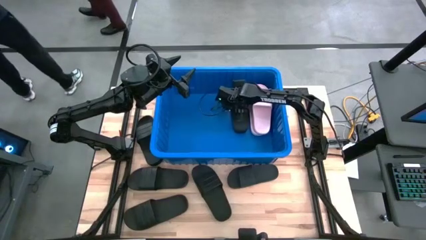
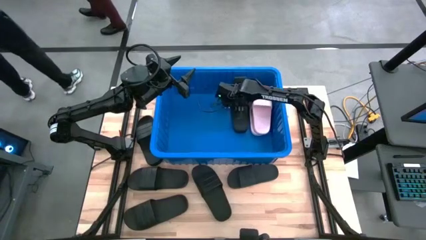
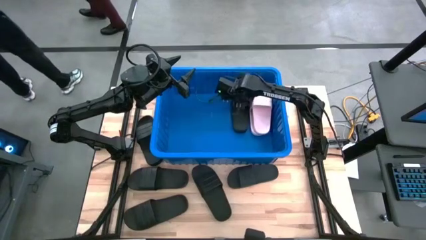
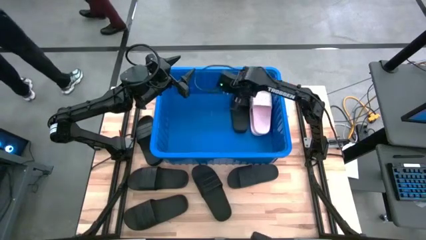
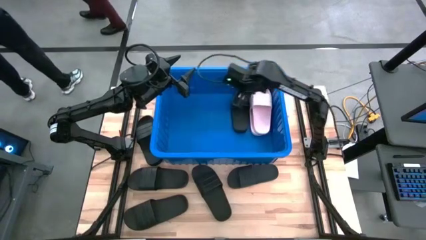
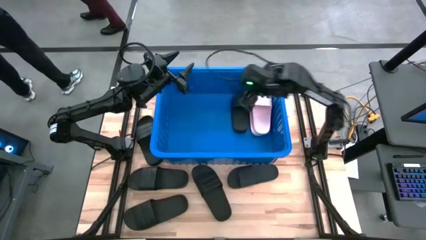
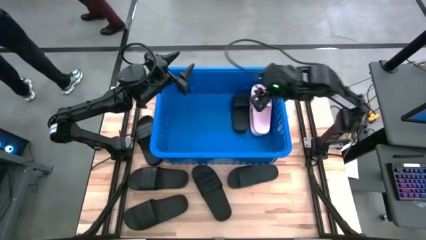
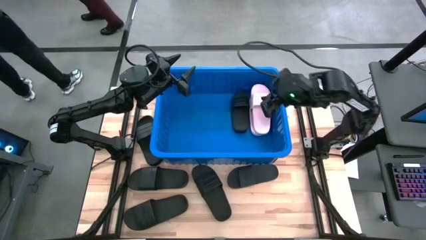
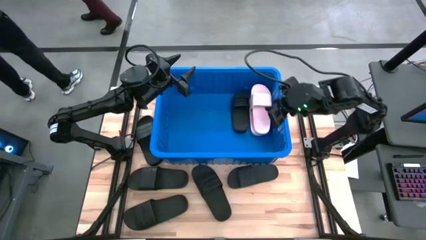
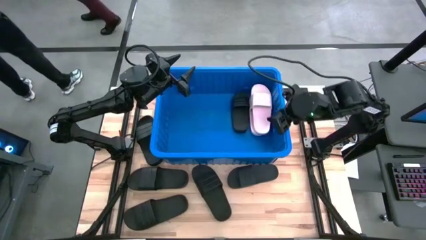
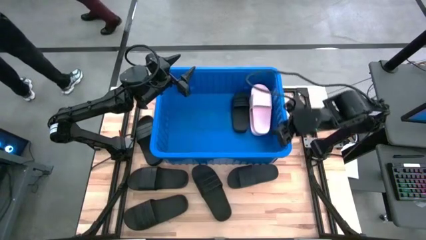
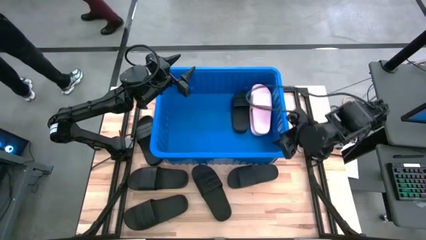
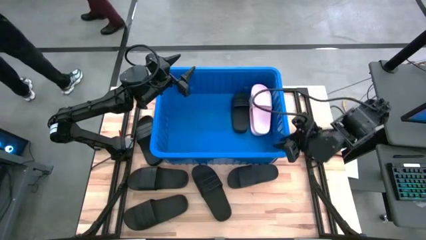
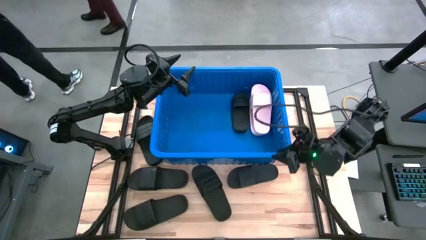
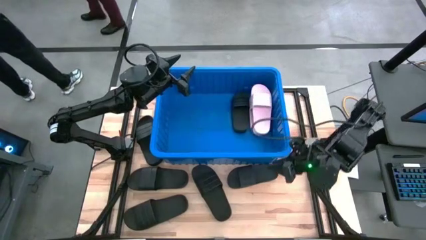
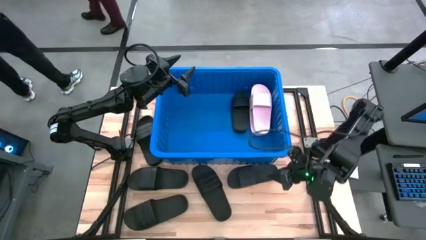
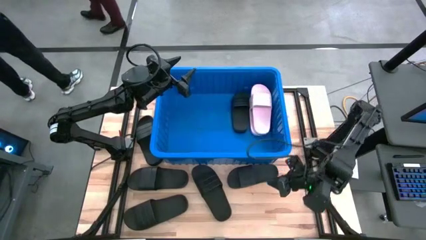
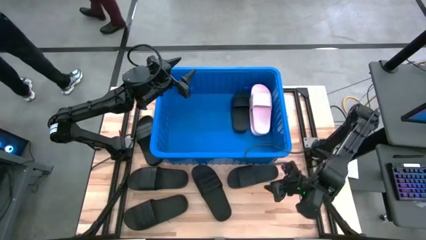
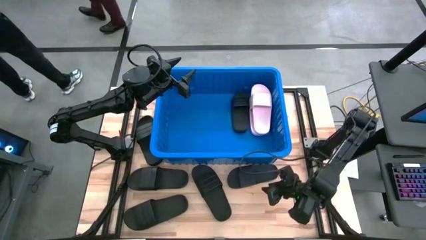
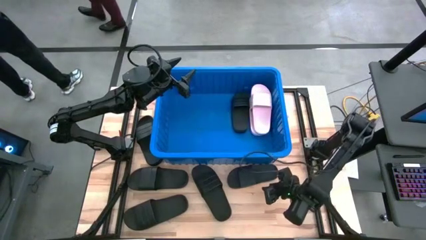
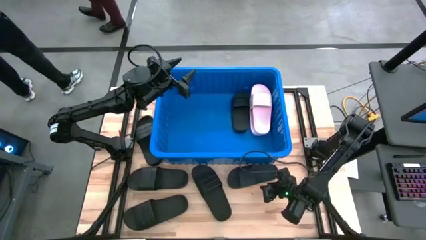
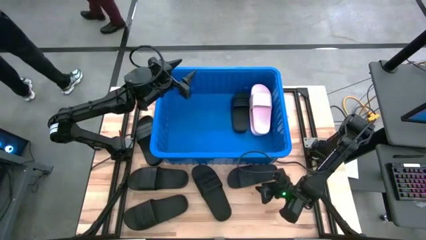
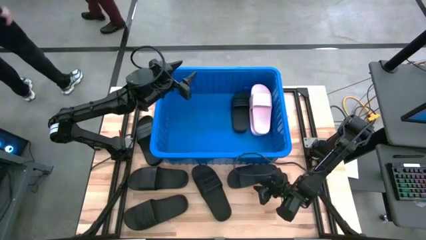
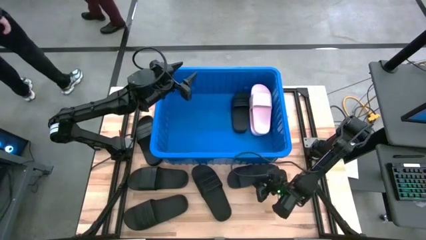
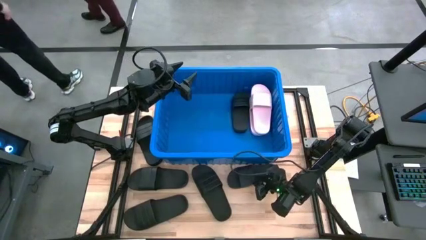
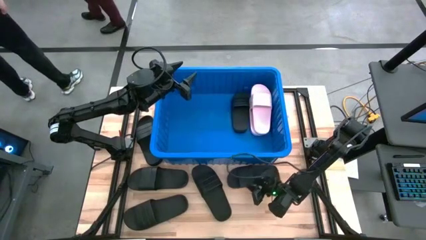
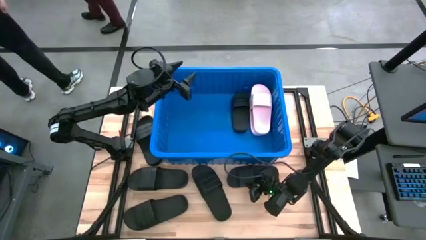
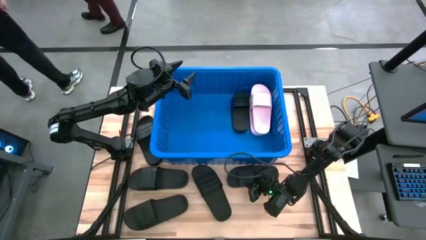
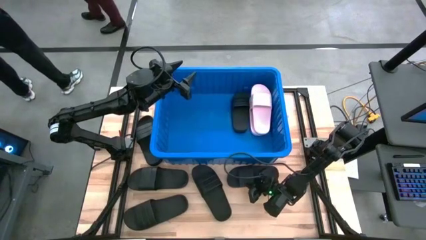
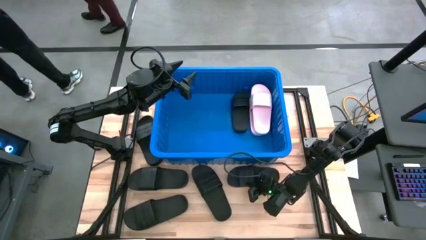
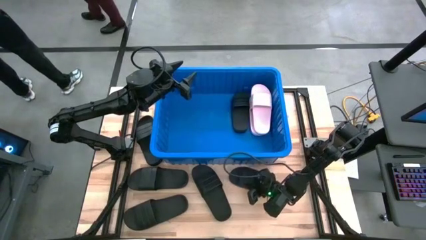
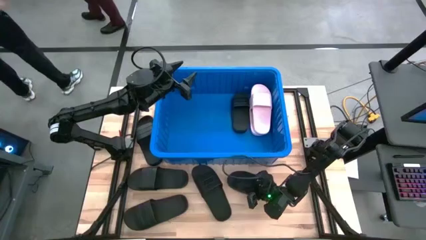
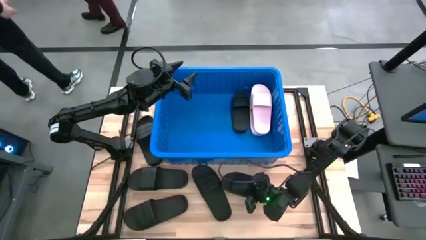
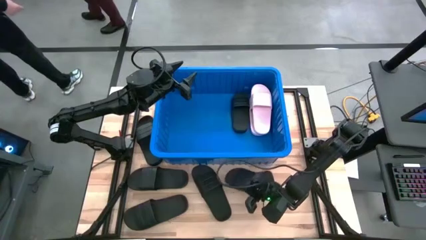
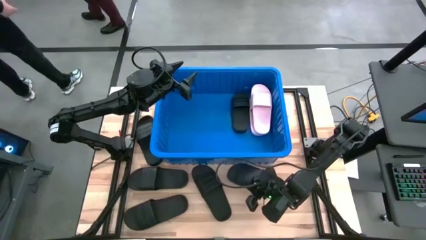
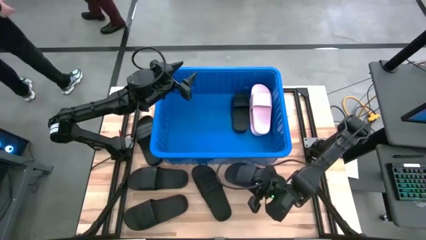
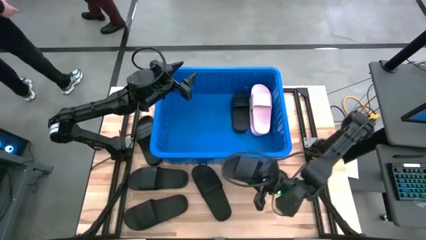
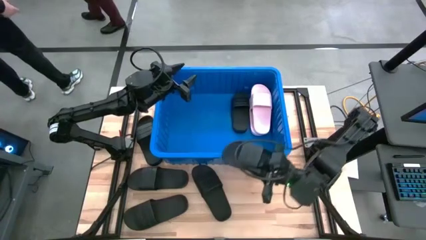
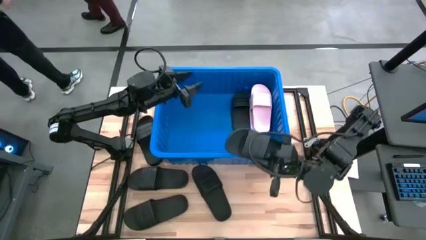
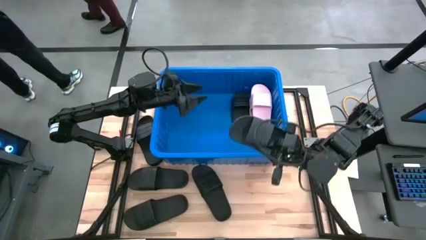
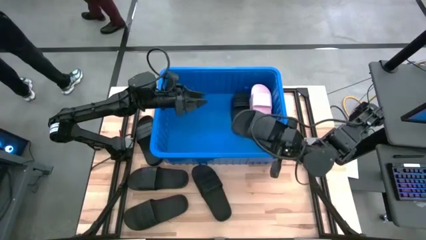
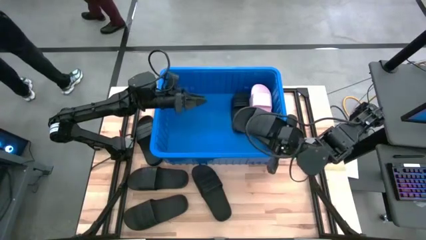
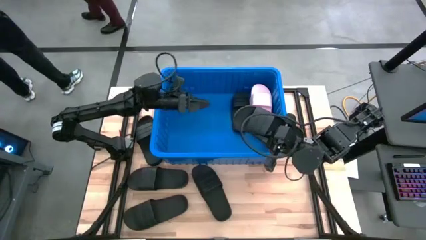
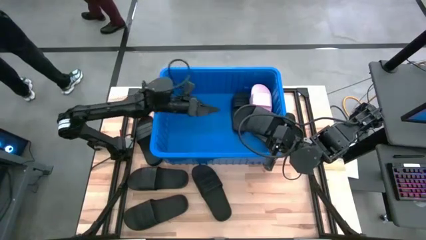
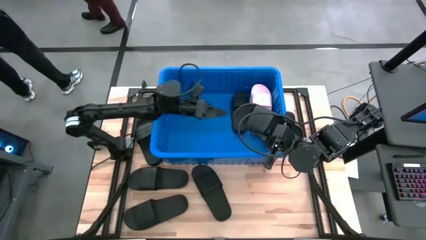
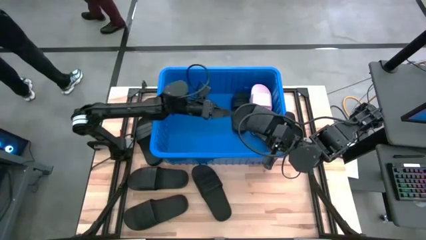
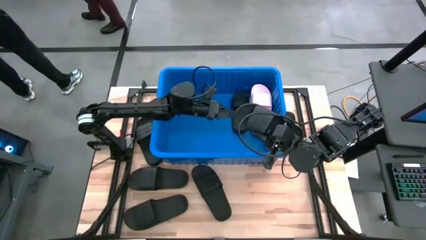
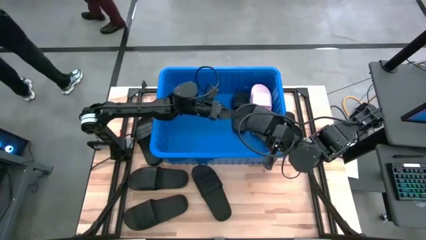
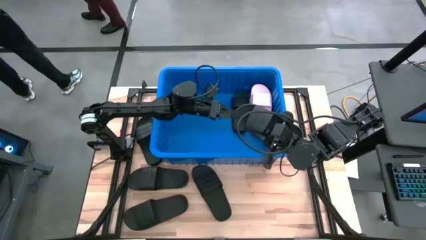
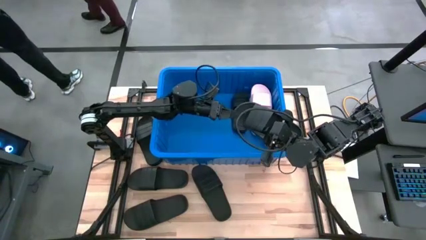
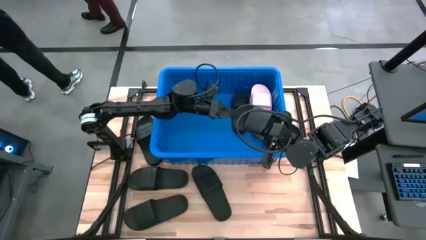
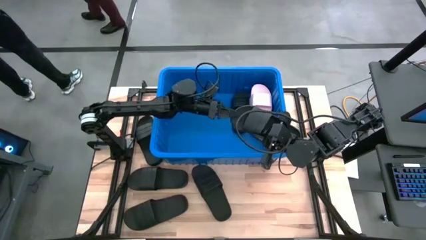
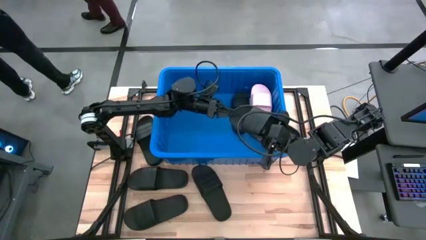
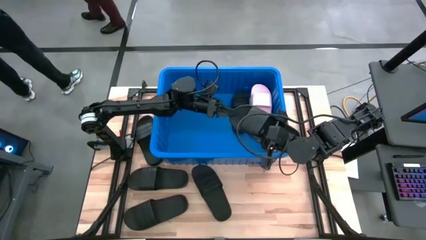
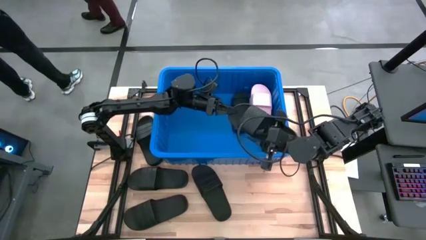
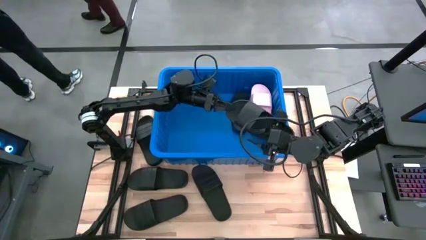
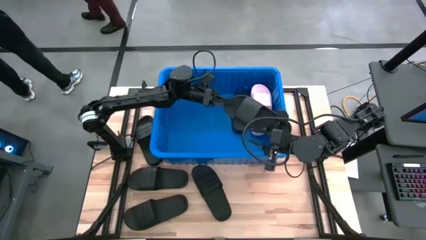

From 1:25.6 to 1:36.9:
Task: Pick and place slides into bin
Stack the black slide on top of black slide into the blue bin
